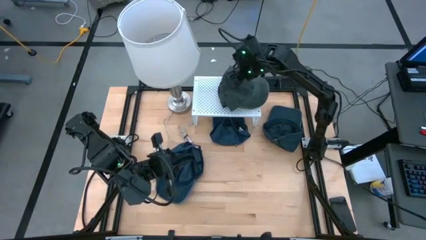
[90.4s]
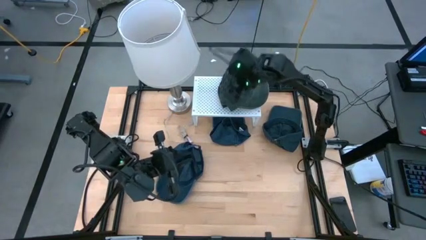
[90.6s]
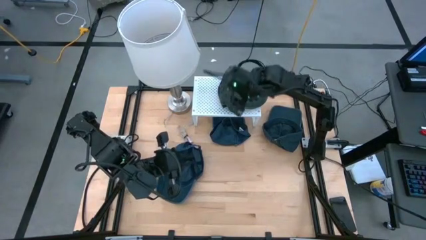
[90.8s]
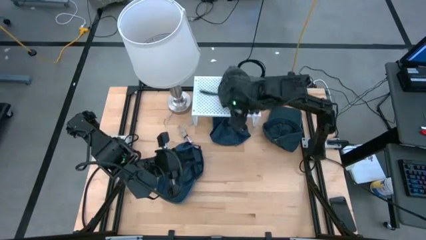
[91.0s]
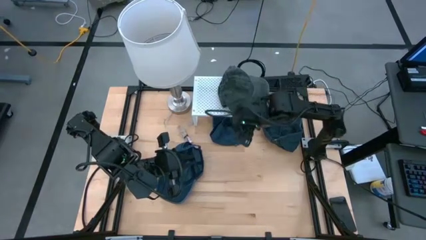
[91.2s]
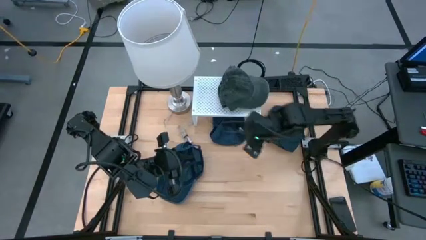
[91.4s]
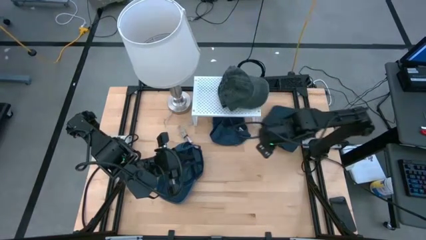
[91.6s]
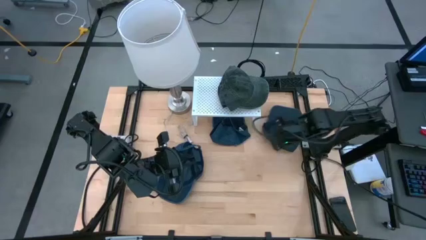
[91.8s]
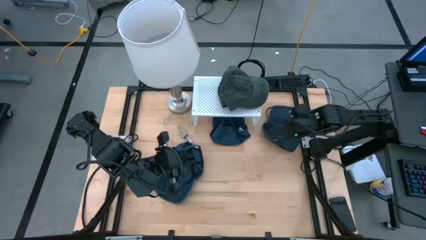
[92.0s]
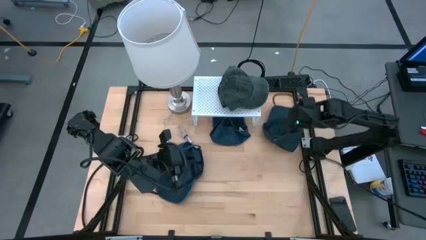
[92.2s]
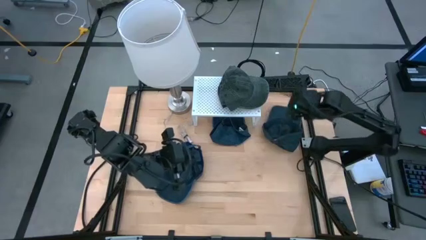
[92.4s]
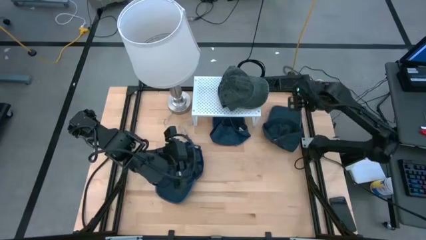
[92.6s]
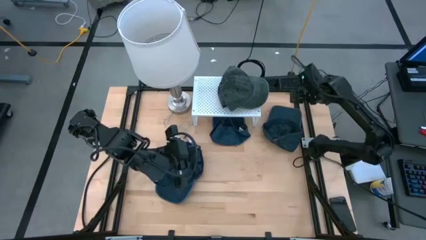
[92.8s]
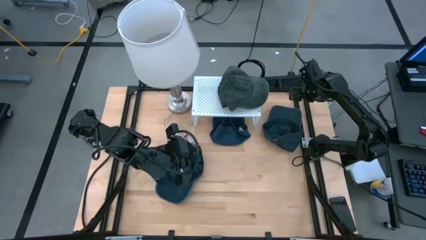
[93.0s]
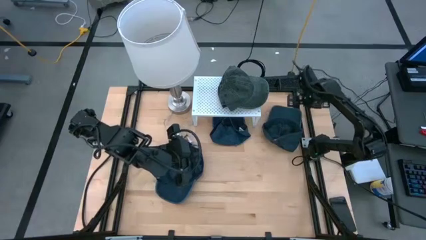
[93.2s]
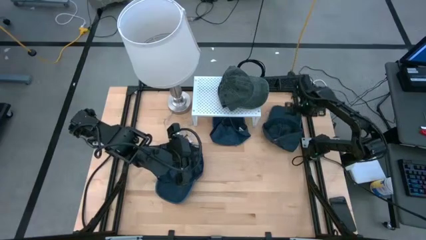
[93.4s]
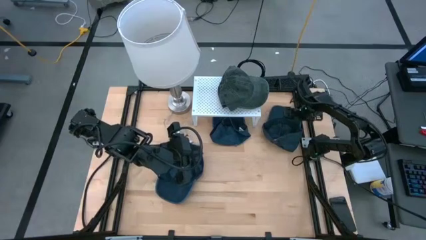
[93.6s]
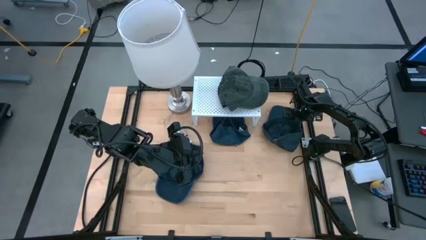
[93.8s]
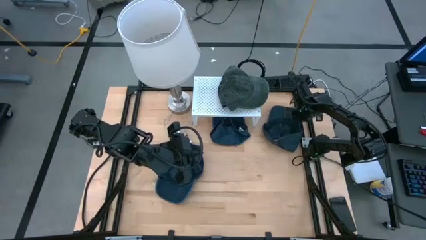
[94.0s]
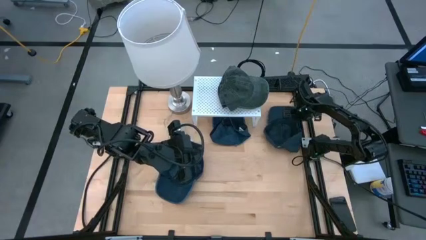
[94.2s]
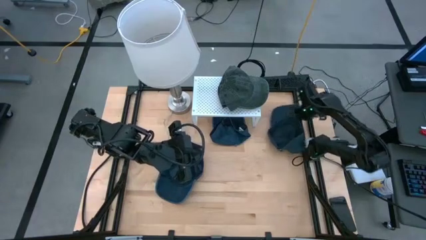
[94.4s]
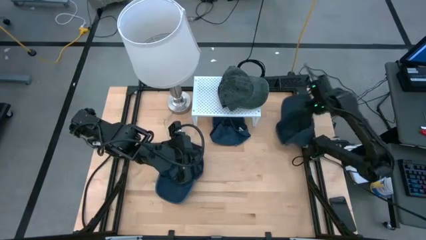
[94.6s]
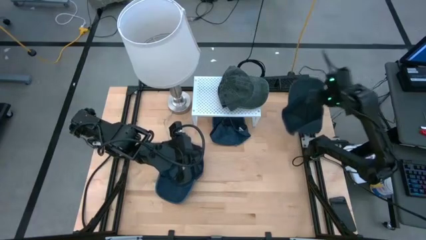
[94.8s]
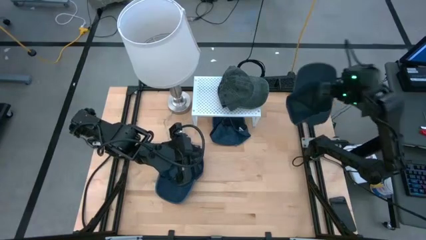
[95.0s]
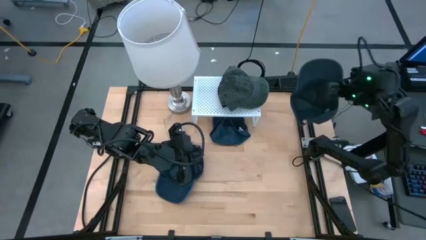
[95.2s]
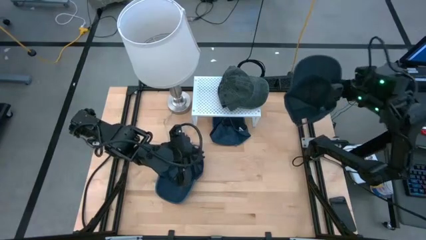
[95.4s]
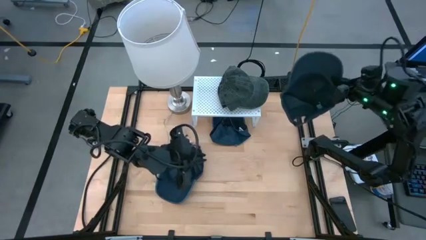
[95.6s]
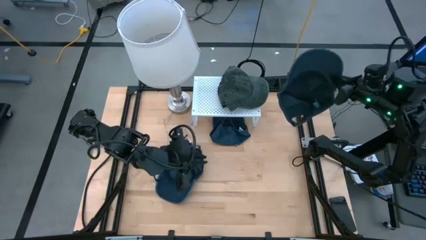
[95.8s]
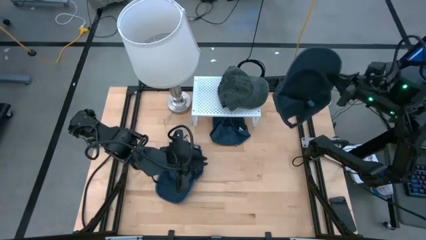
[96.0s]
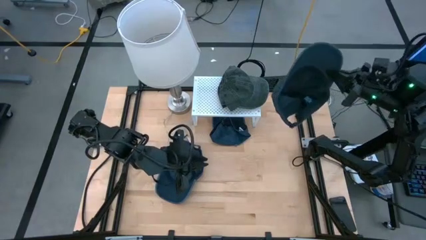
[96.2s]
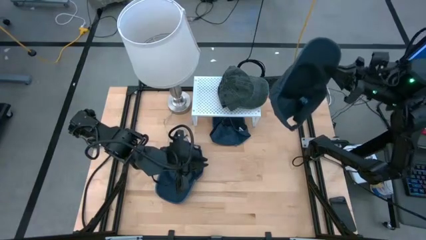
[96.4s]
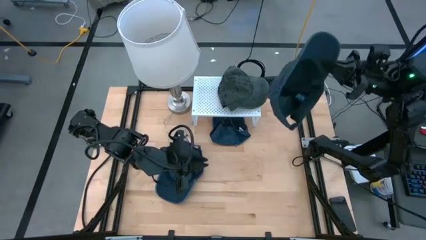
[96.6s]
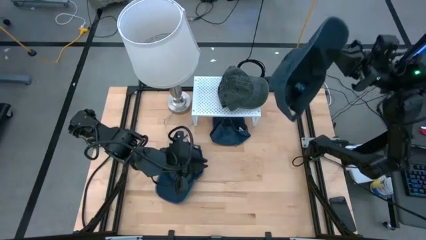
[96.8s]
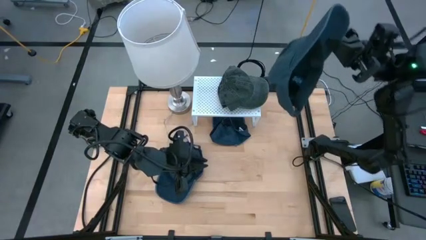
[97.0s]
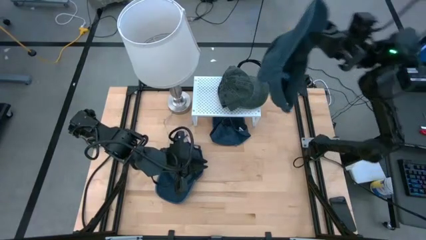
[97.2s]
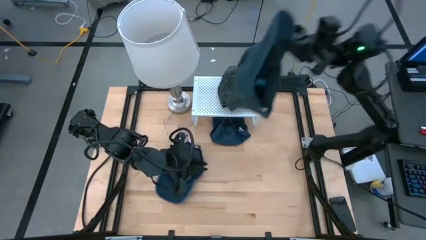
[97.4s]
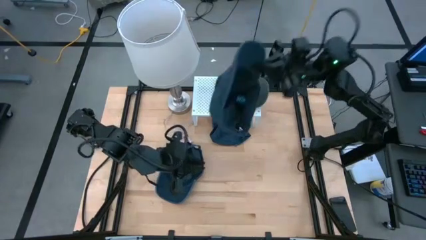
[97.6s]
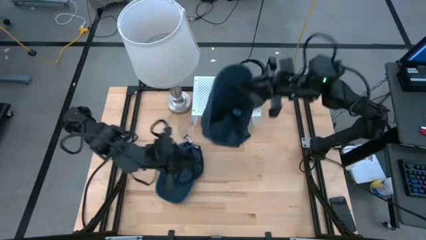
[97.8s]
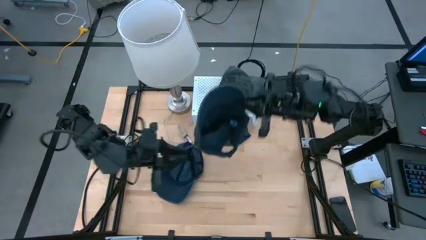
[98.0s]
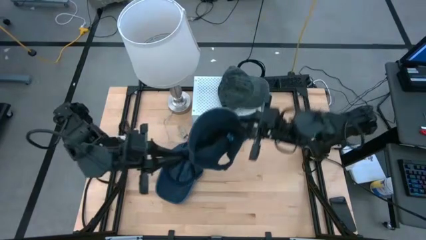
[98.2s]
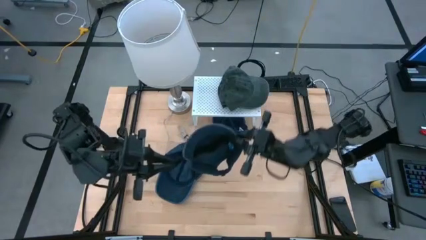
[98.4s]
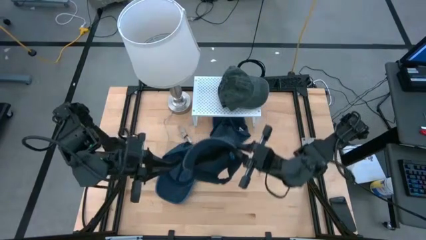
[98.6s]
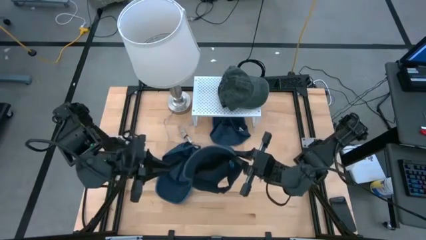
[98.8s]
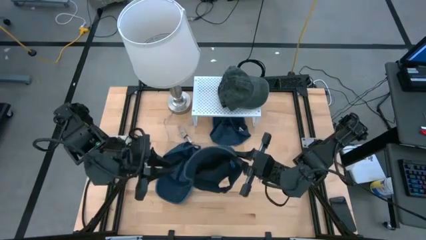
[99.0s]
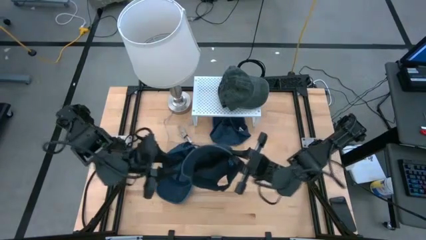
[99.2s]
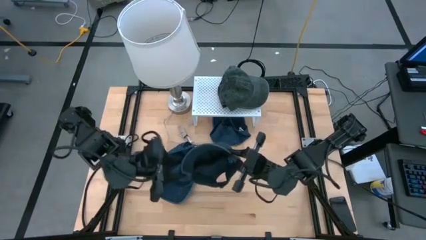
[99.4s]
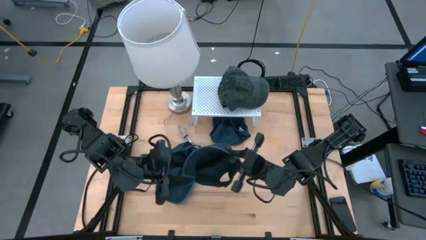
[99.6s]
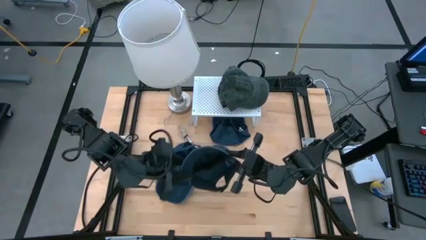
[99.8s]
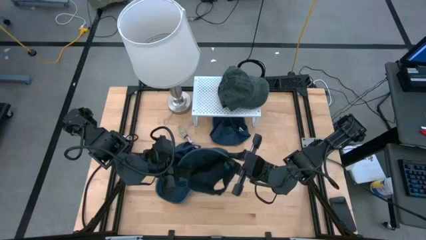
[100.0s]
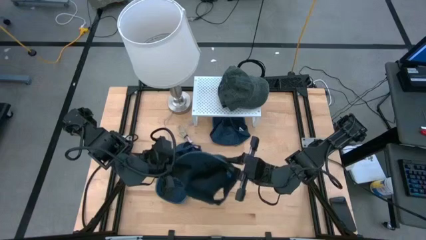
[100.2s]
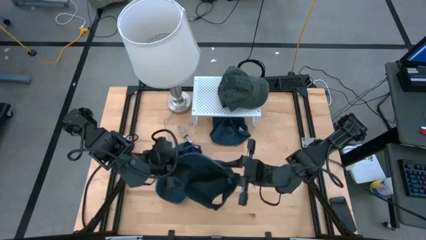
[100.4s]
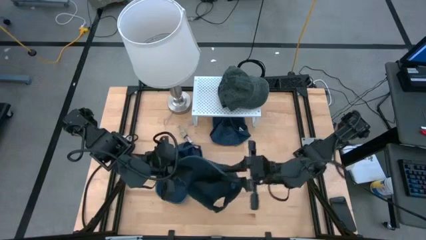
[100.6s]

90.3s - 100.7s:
Task: Pick & Place hat
Put the top right blue cap on the shelf

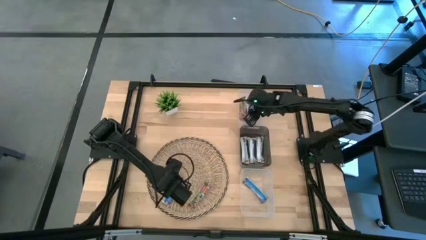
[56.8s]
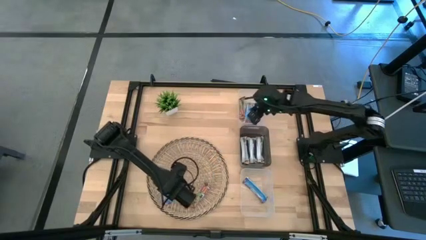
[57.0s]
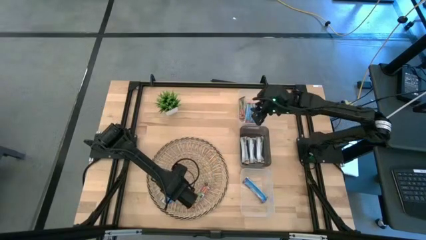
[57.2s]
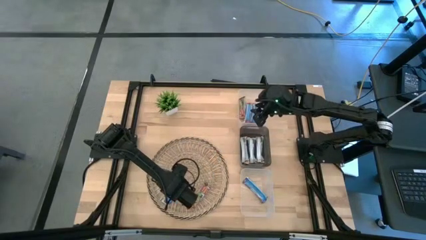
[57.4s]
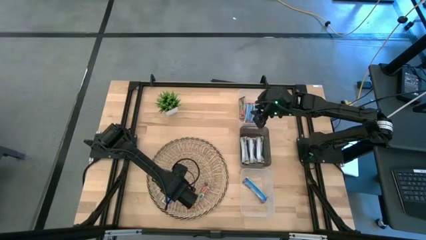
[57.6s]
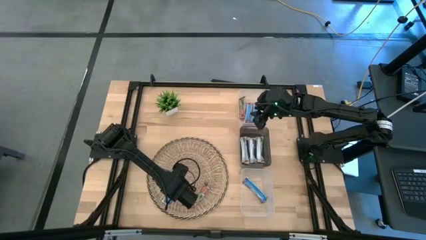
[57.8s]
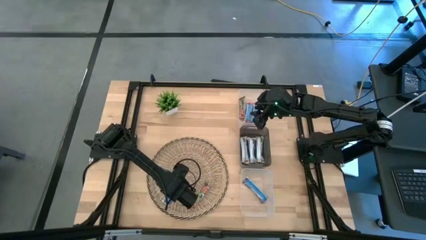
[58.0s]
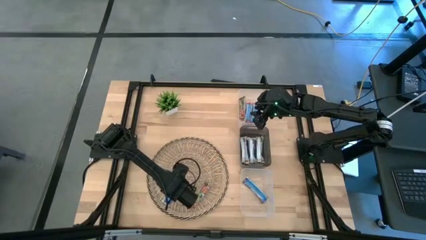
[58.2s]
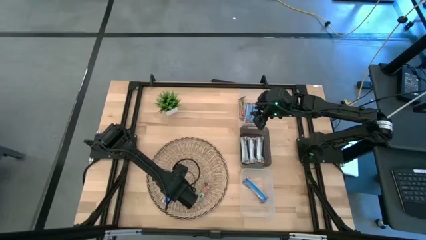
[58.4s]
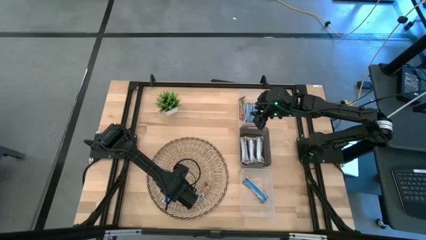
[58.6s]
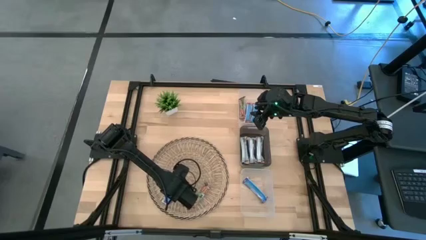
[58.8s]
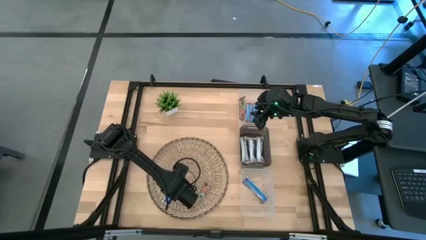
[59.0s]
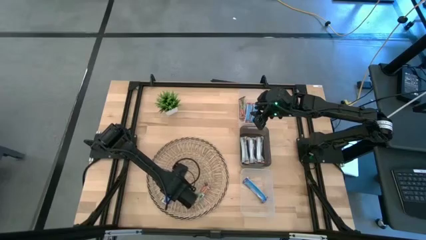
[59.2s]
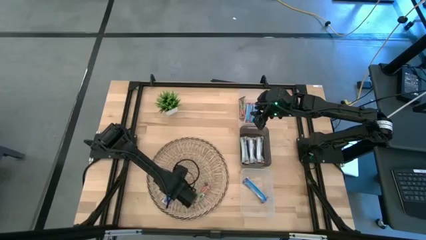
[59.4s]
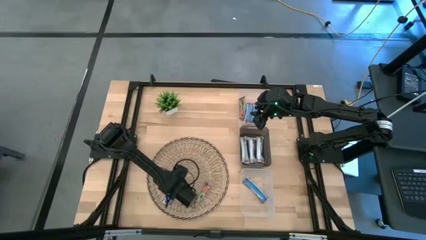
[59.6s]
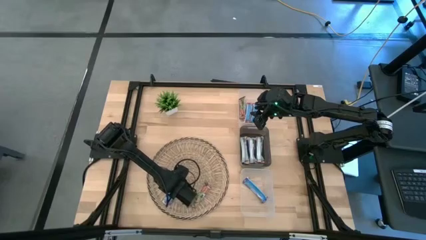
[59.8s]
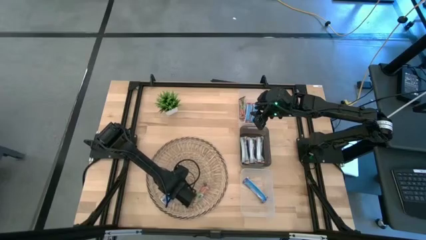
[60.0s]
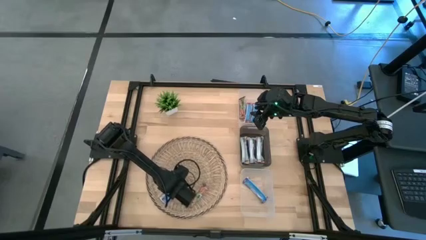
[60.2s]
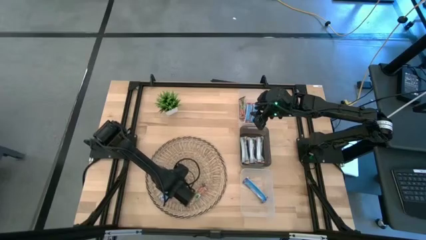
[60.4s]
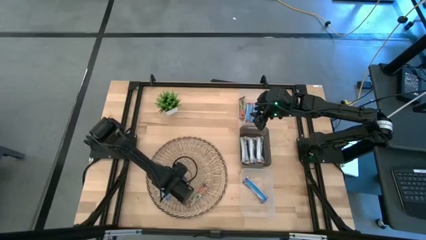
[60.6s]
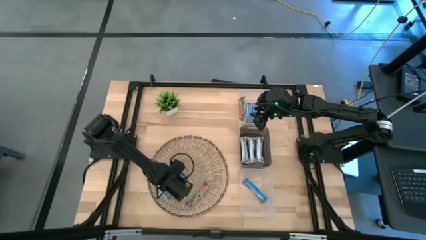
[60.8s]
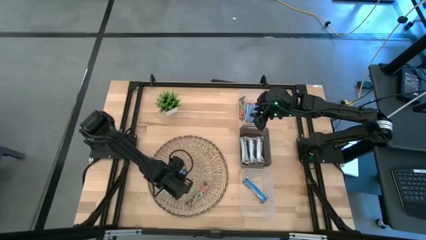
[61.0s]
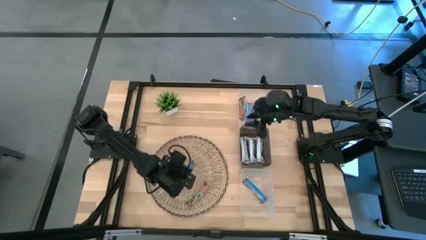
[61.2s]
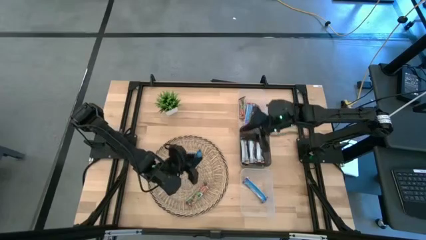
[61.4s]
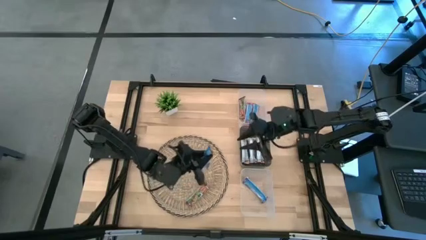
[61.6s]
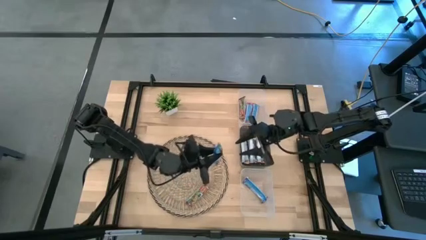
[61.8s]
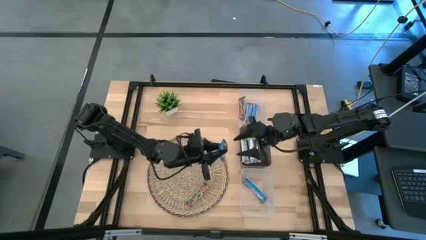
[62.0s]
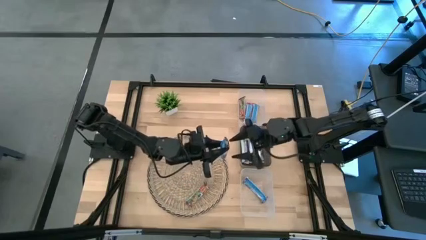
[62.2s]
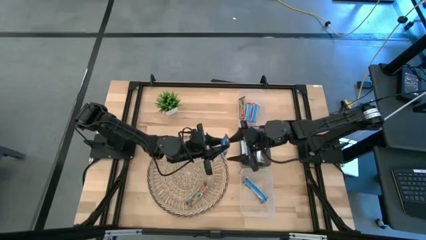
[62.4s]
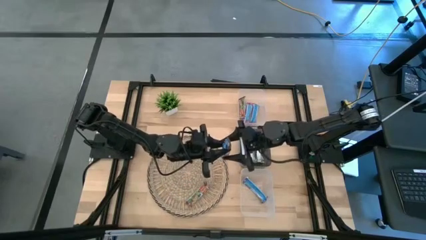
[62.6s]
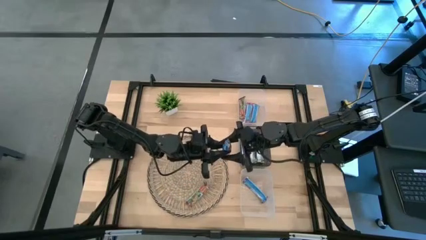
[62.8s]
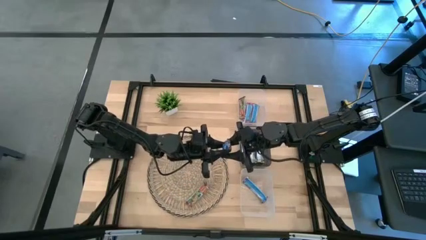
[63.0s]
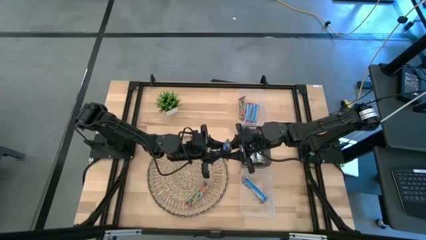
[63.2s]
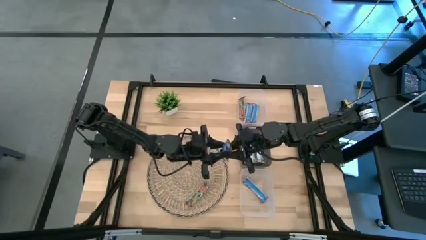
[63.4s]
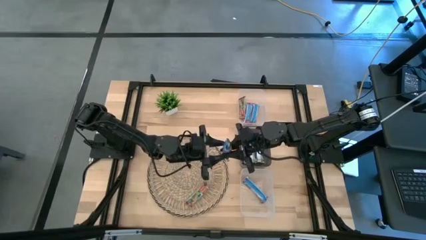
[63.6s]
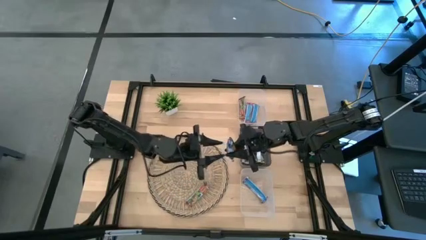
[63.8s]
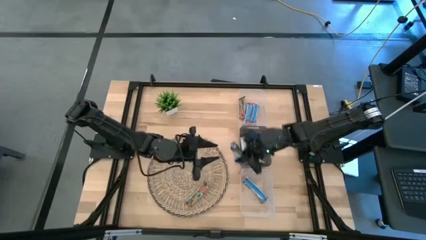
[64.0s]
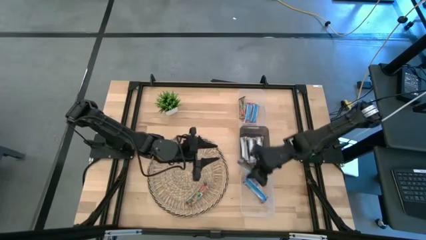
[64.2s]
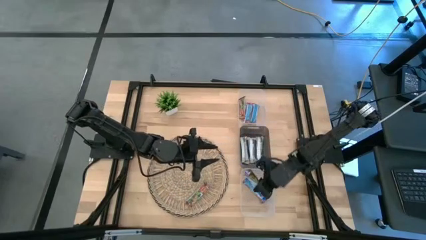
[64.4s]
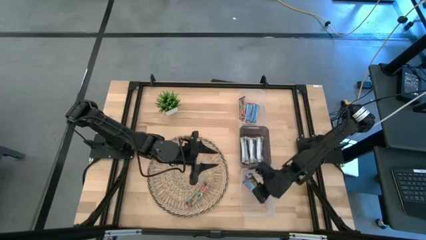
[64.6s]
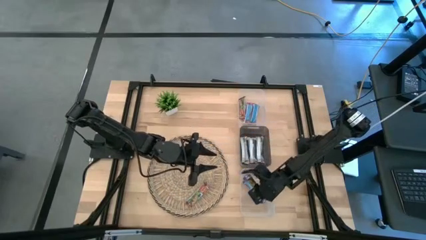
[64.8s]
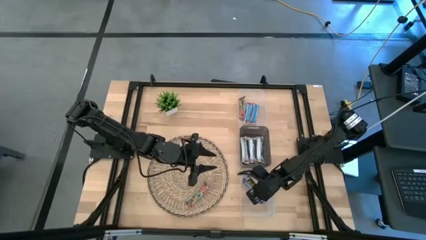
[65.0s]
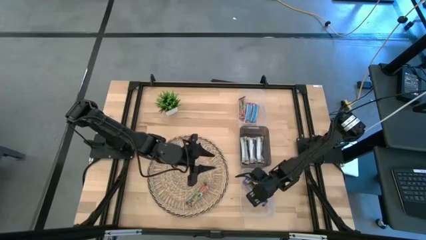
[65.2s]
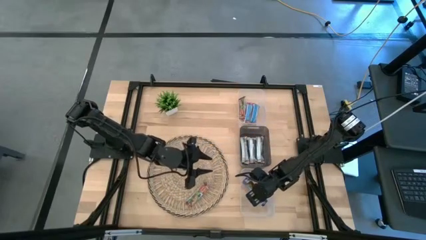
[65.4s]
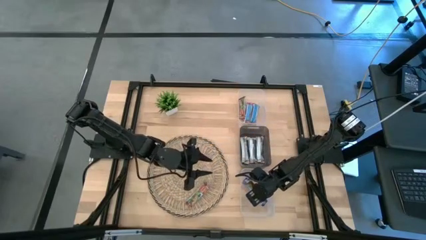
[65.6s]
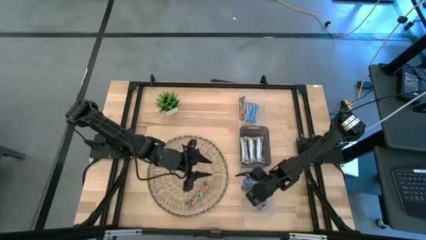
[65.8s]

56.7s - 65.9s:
Task: Pick and place Granola Bars by type
Put the blue granola bar into the bottom transparent bin
